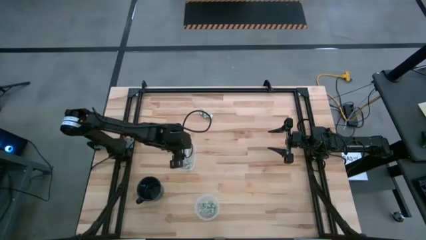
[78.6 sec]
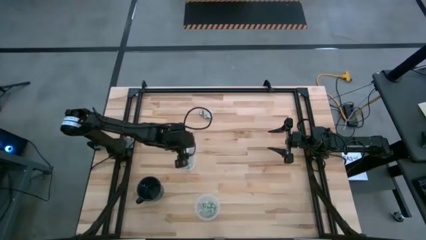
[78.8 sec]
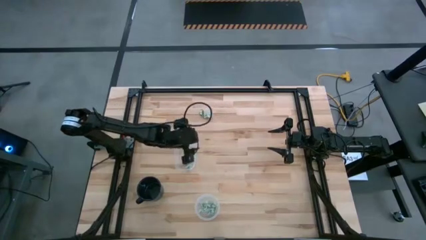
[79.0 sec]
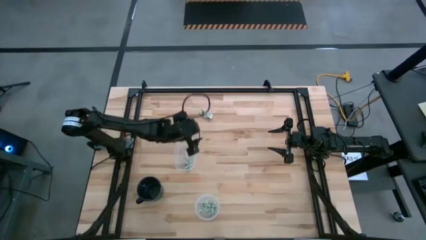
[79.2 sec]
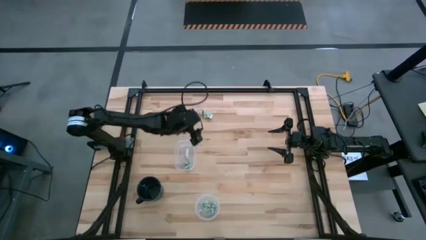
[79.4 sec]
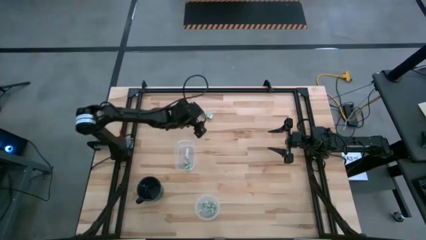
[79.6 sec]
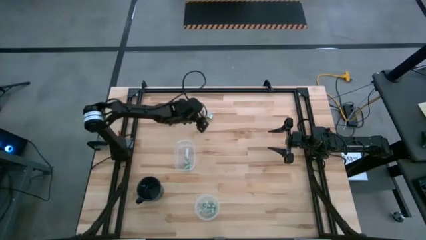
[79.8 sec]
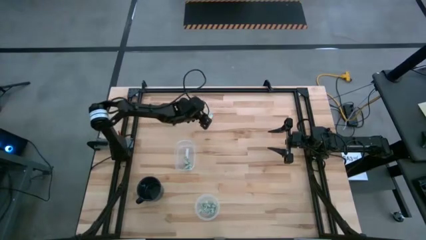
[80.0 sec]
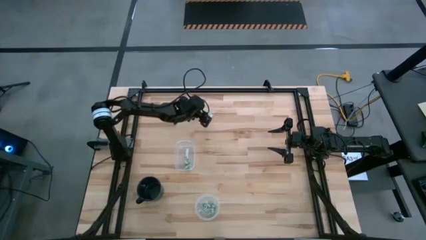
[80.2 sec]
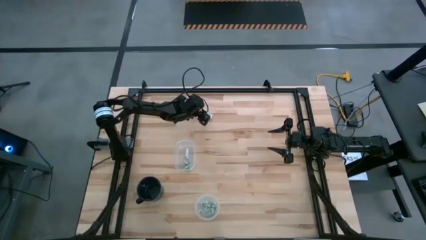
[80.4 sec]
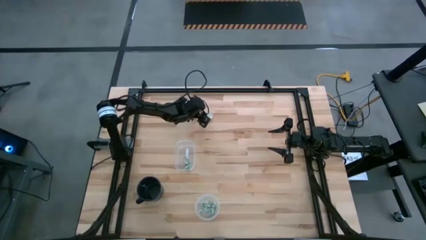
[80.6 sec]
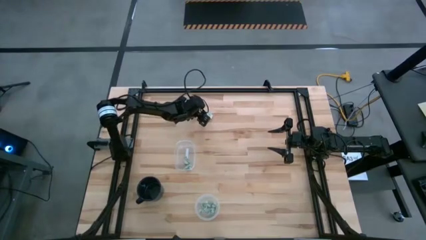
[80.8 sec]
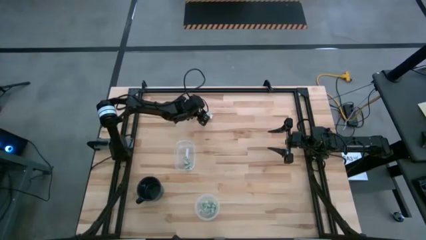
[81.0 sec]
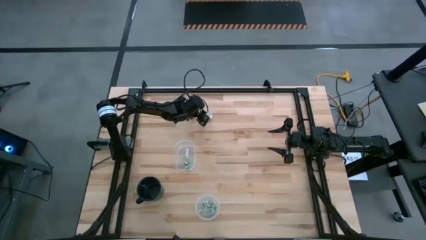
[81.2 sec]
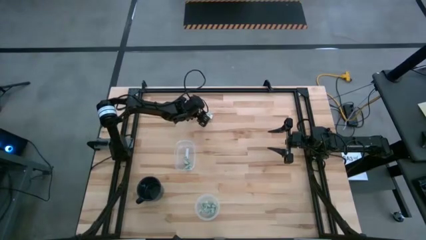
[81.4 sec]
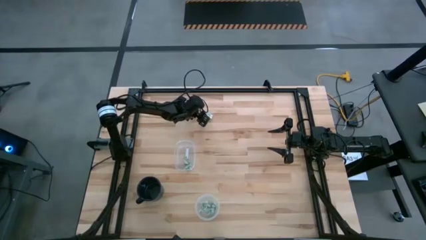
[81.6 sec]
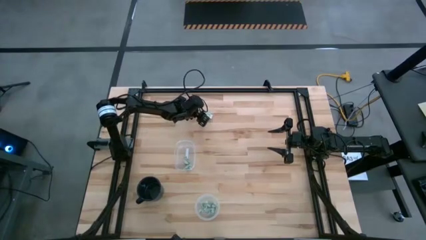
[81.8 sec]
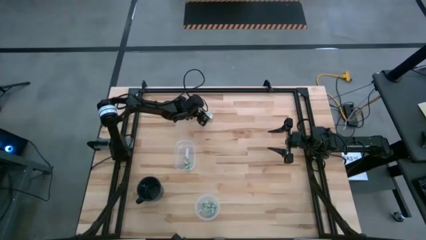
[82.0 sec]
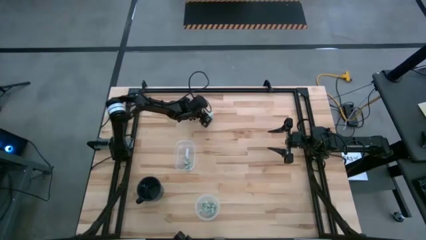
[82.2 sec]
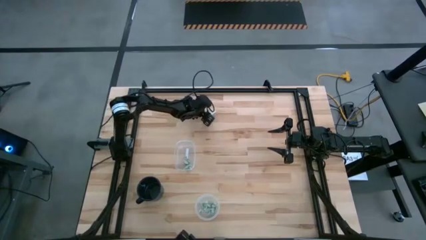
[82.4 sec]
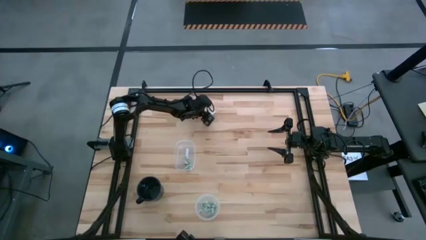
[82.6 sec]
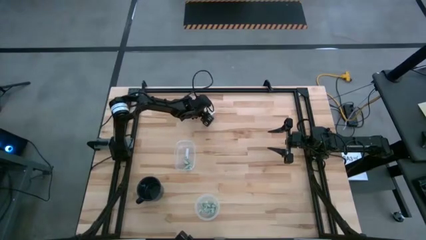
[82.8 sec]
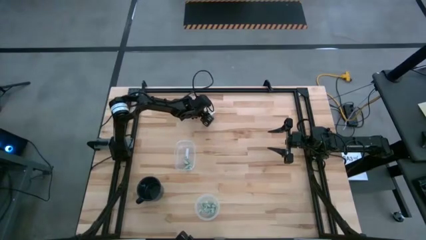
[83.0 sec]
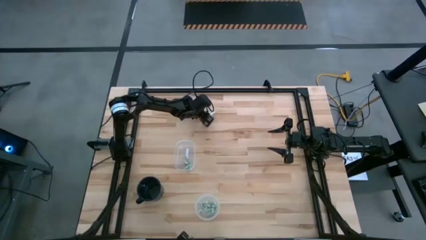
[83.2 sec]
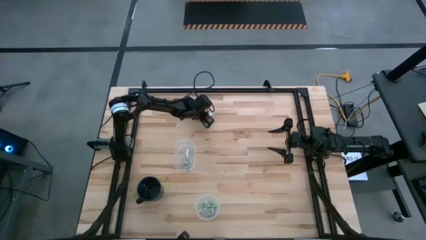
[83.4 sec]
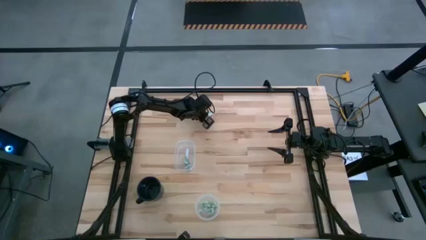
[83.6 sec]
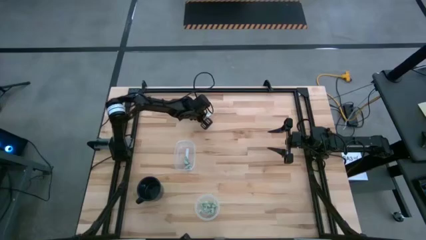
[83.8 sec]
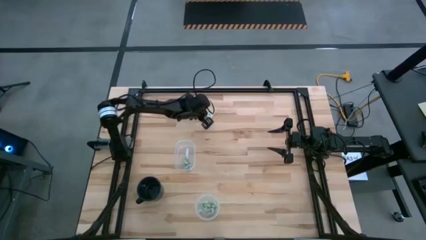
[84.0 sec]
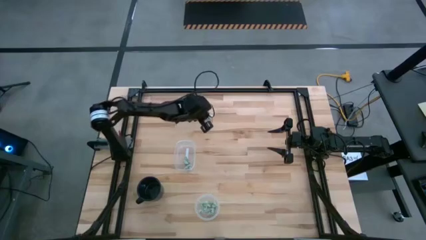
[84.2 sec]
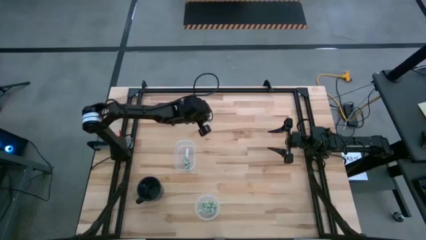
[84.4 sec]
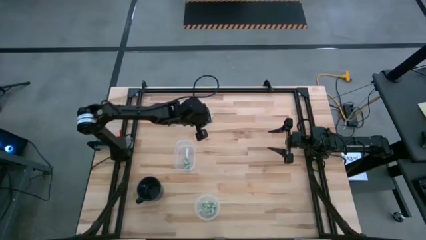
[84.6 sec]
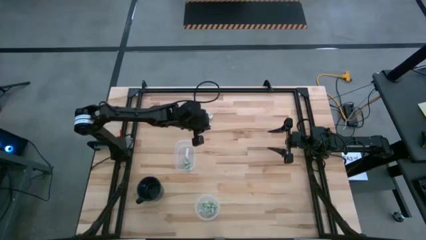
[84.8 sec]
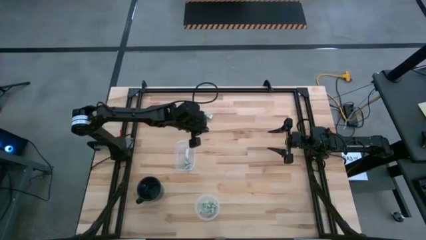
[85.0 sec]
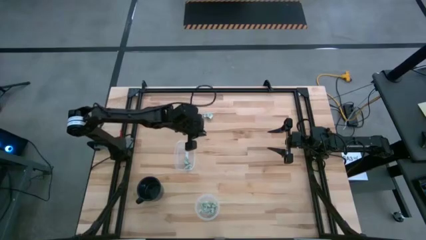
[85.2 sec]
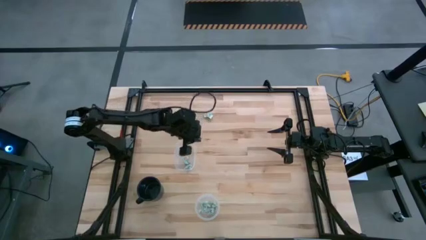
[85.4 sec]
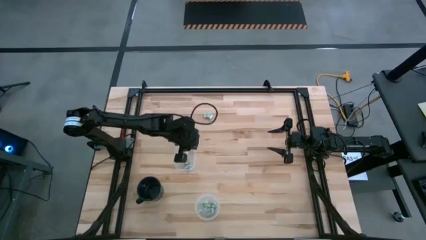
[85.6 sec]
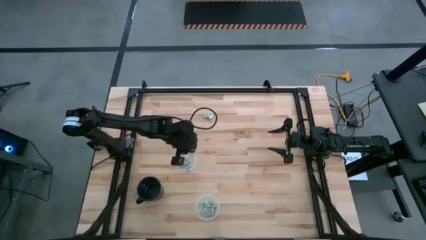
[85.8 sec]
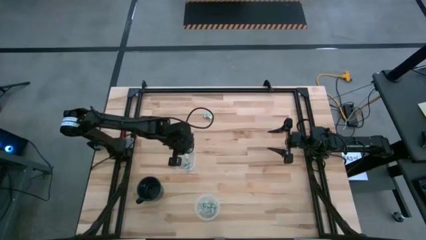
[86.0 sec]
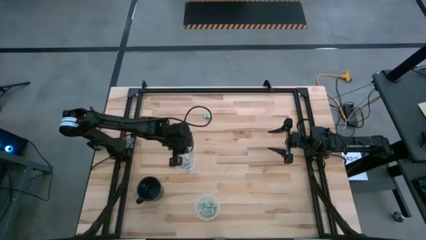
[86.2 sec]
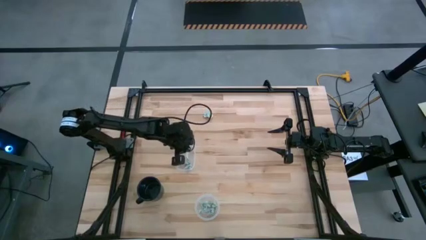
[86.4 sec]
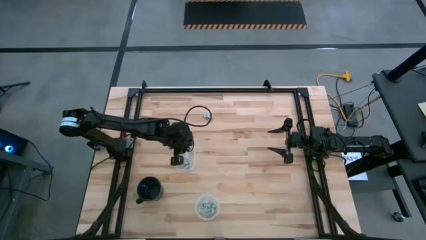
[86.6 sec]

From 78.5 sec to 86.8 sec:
Task: Pick and place Stevia / Truvia into bins
Put the truvia packet into the oval transparent container

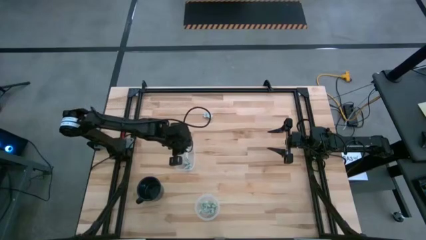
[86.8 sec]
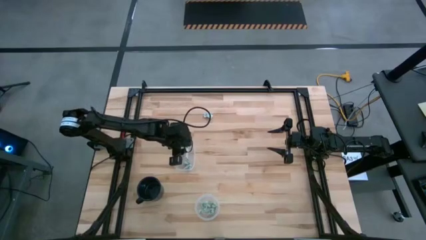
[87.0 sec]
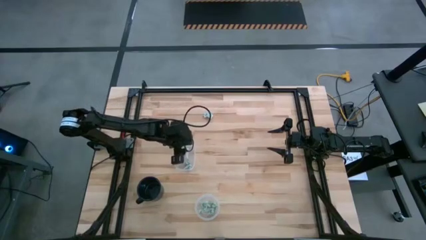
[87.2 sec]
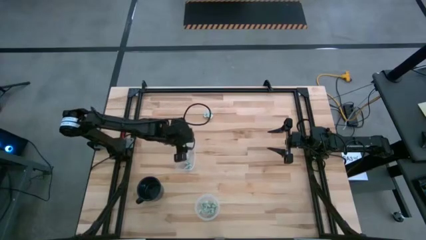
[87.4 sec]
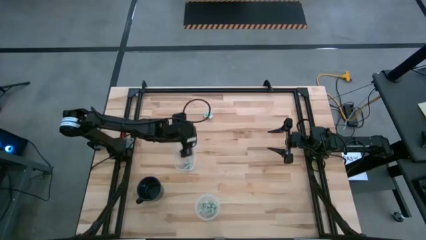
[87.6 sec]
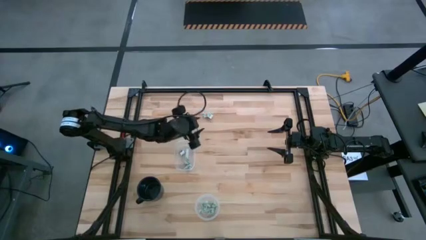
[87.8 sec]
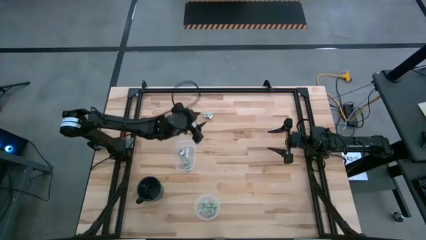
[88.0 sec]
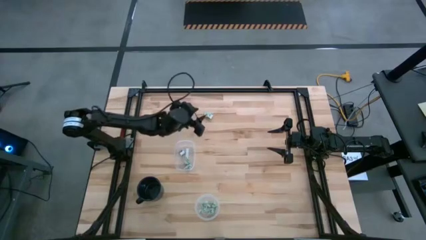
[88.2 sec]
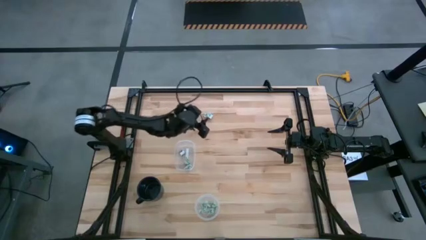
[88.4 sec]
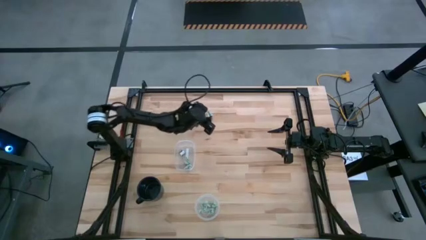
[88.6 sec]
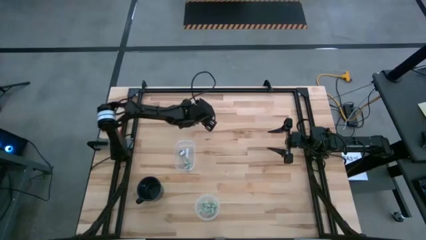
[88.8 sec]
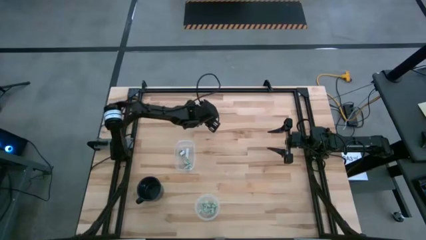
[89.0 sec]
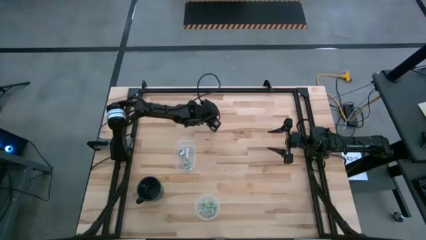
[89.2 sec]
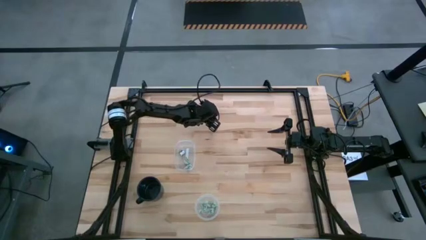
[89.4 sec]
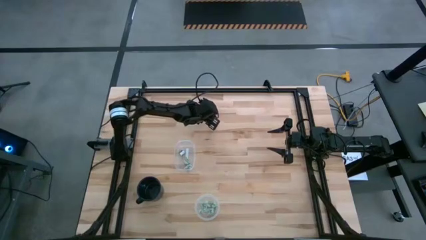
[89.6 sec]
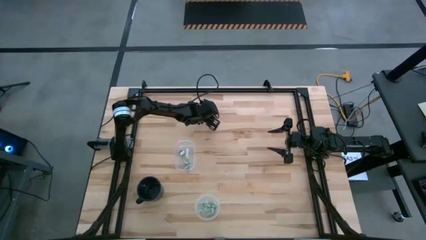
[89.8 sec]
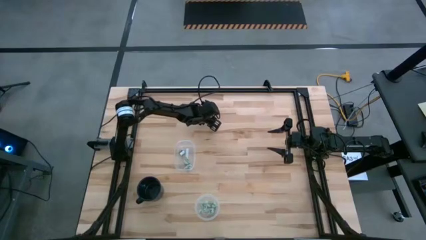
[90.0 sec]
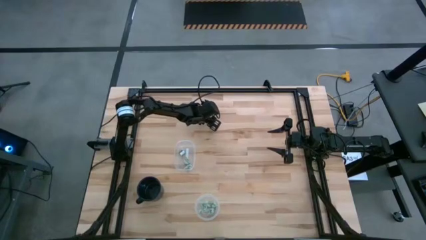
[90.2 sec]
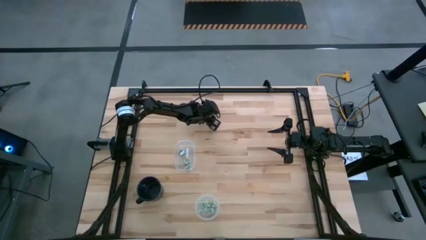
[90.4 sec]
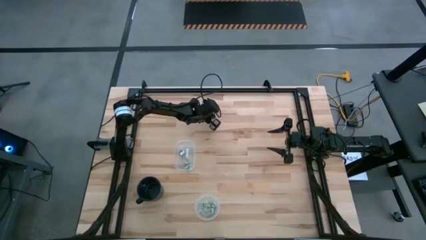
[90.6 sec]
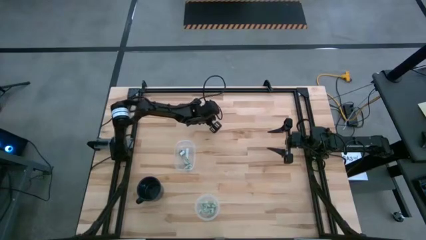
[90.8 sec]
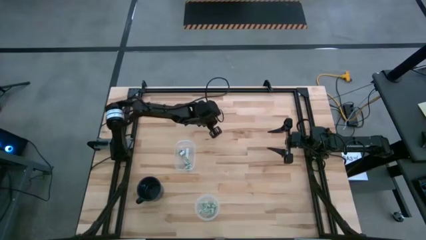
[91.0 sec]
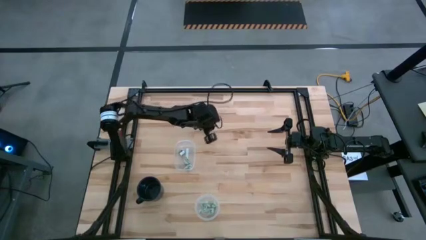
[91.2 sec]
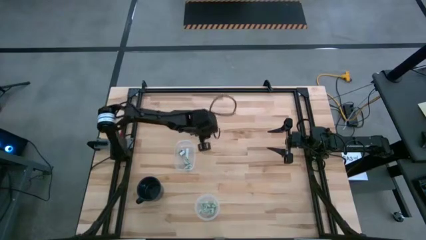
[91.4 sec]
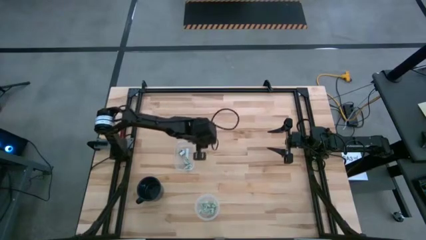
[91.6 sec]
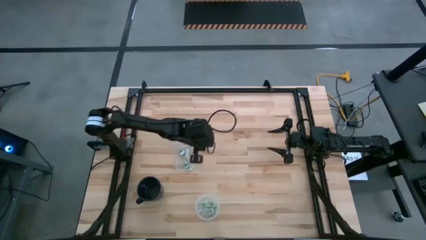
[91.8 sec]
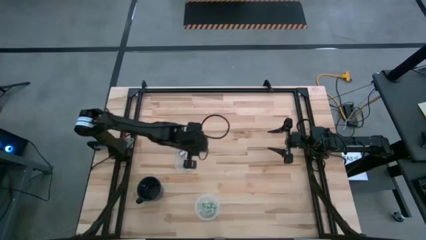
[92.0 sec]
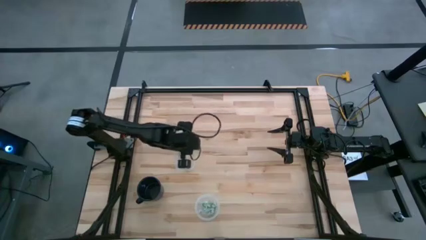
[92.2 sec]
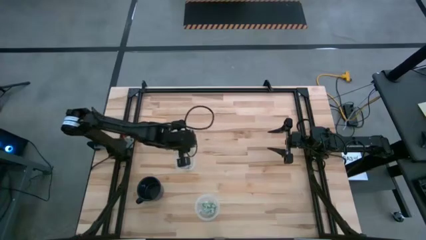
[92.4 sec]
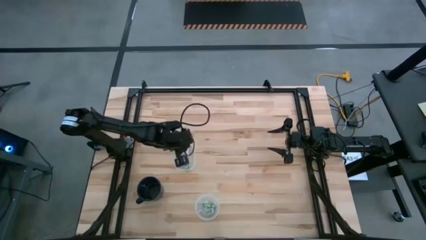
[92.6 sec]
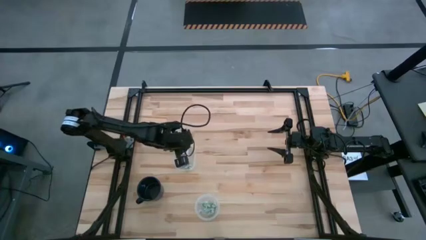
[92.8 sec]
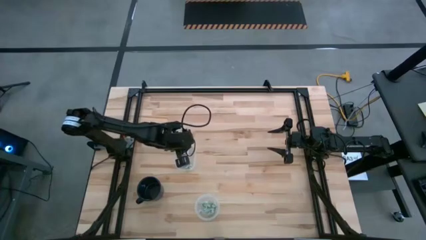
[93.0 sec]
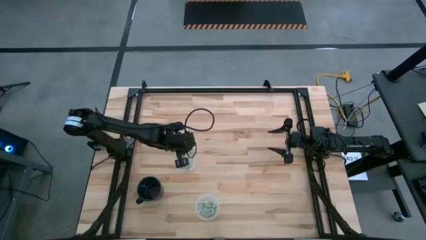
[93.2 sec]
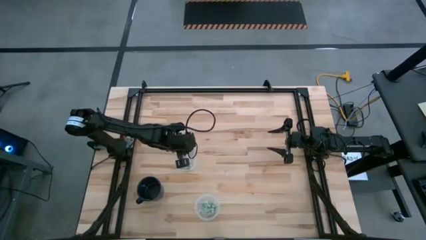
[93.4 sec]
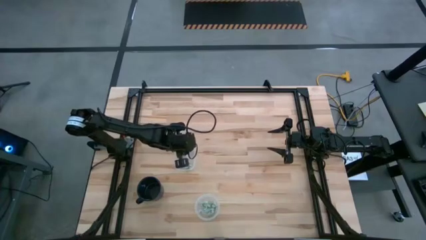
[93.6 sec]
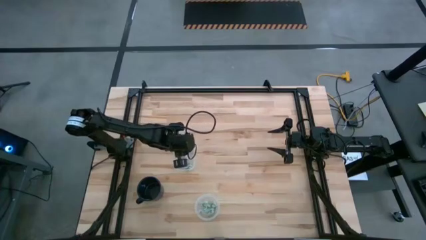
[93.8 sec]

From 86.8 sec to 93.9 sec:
Put the stevia packet into the oval transparent container
